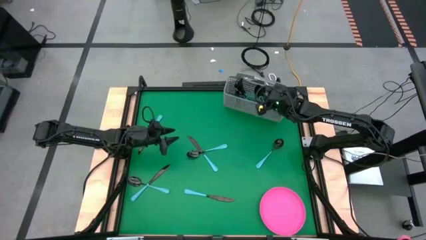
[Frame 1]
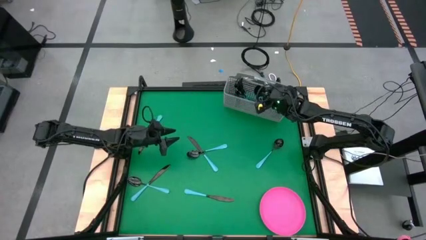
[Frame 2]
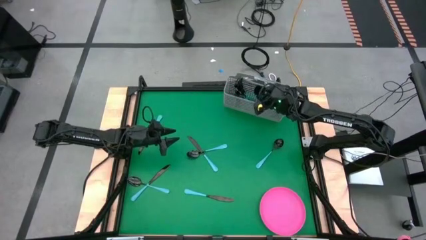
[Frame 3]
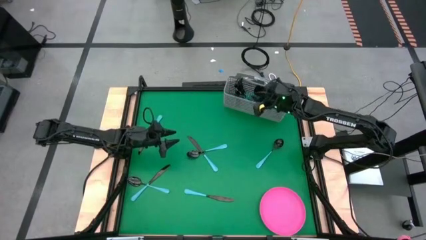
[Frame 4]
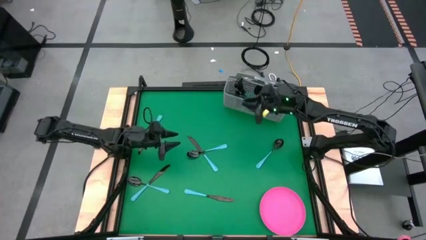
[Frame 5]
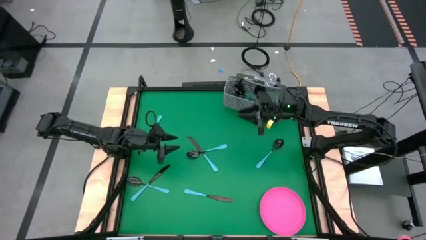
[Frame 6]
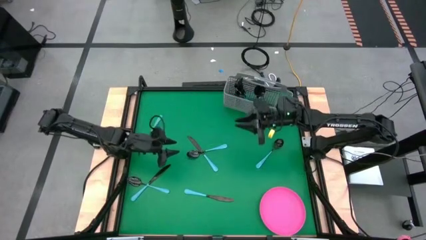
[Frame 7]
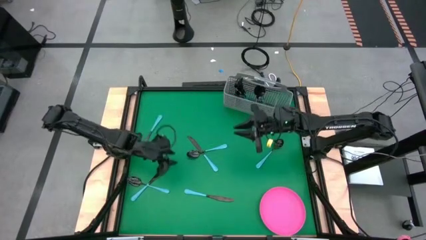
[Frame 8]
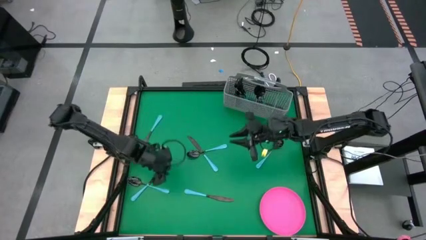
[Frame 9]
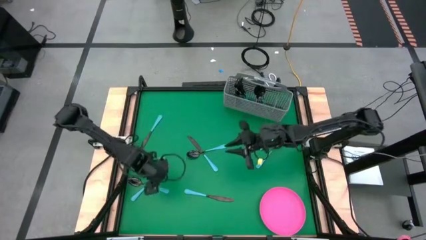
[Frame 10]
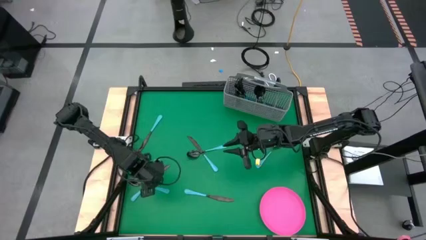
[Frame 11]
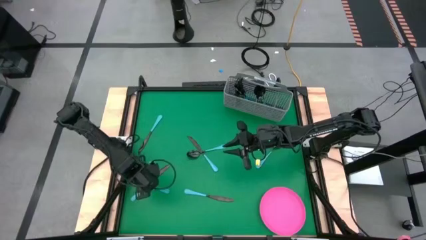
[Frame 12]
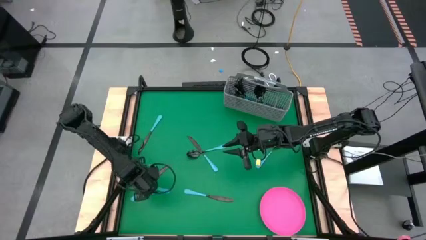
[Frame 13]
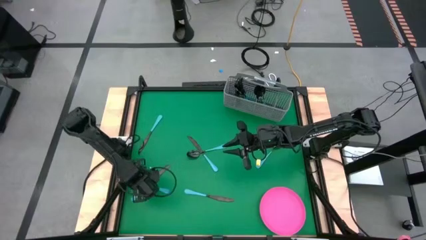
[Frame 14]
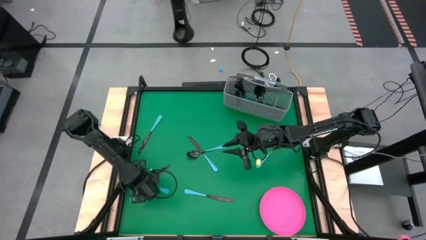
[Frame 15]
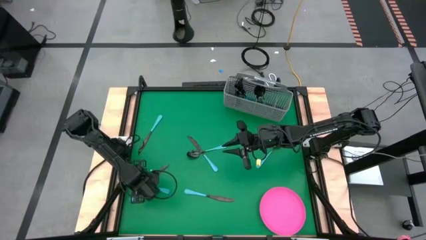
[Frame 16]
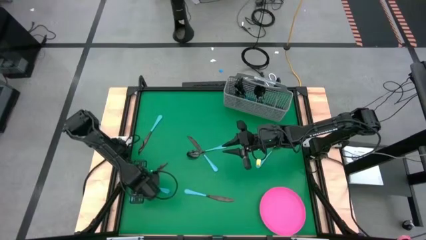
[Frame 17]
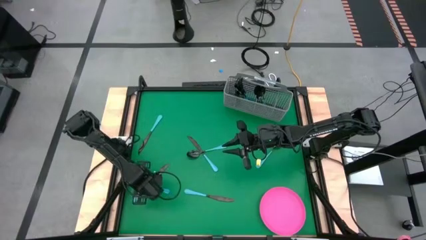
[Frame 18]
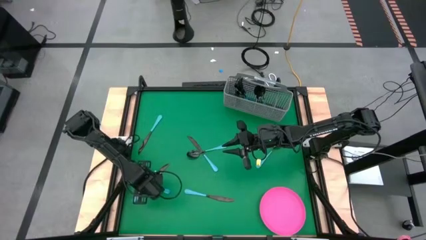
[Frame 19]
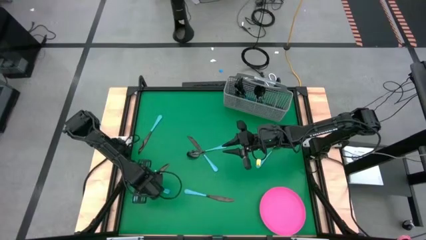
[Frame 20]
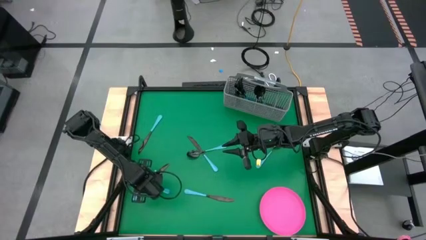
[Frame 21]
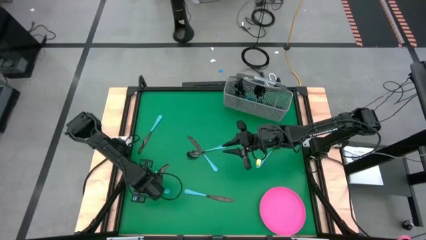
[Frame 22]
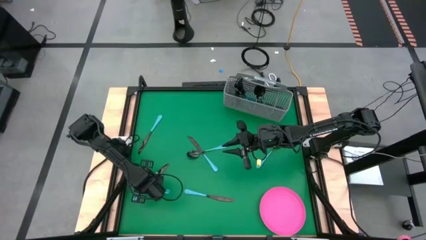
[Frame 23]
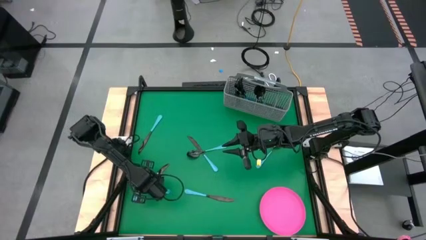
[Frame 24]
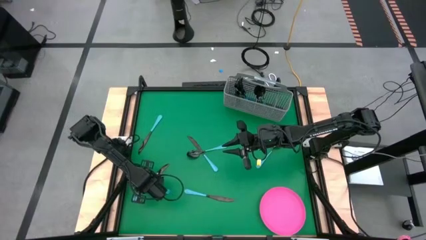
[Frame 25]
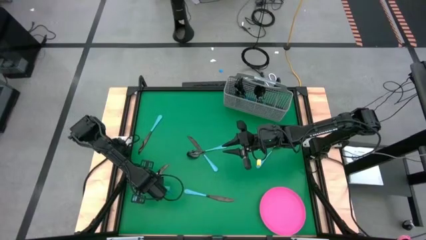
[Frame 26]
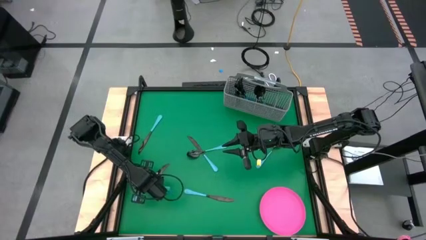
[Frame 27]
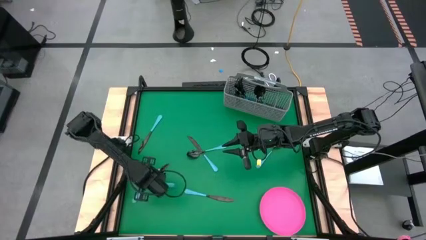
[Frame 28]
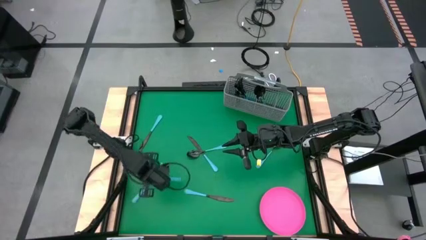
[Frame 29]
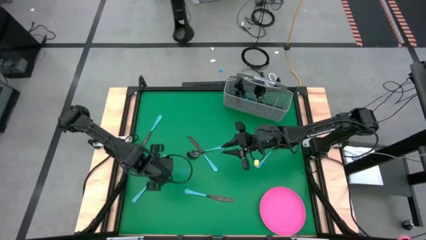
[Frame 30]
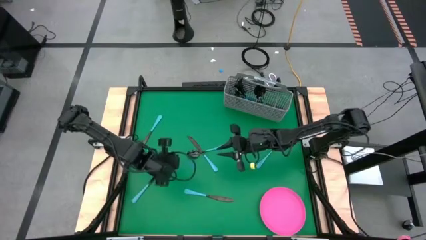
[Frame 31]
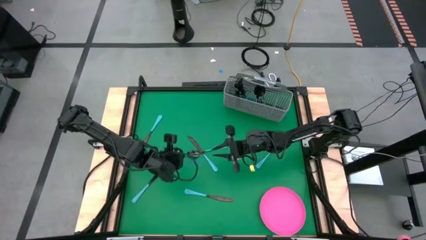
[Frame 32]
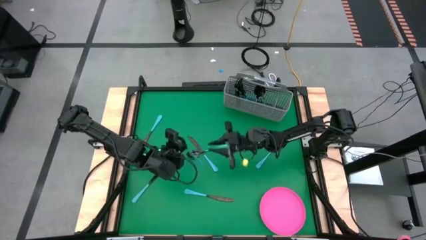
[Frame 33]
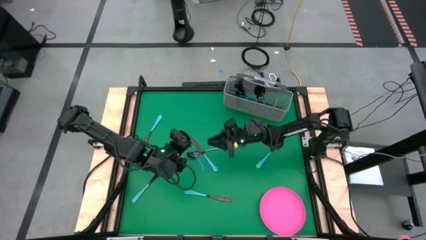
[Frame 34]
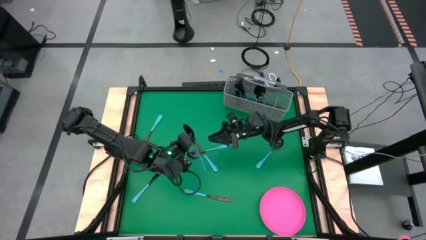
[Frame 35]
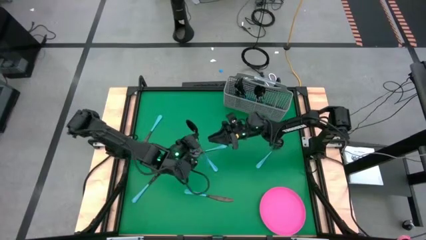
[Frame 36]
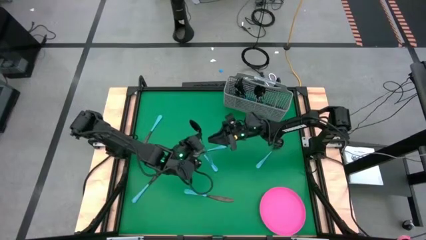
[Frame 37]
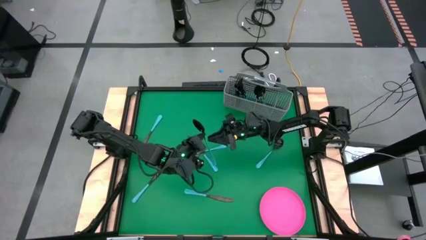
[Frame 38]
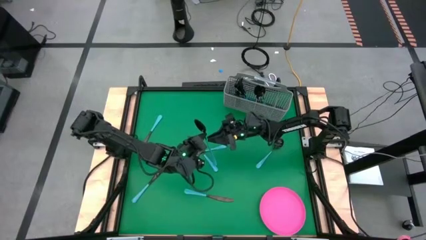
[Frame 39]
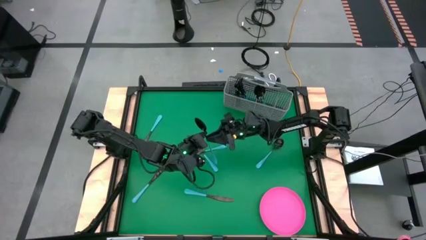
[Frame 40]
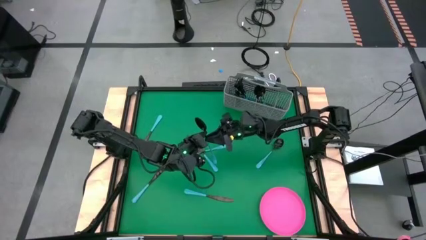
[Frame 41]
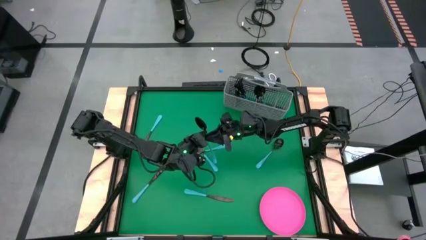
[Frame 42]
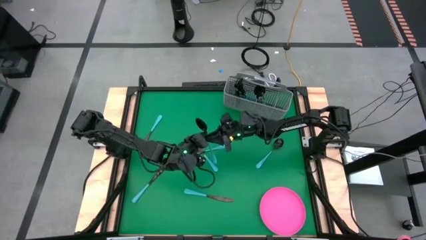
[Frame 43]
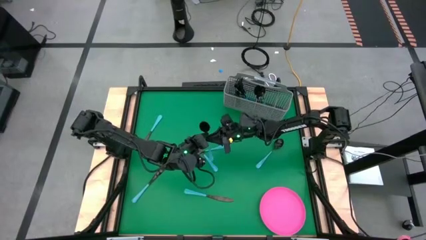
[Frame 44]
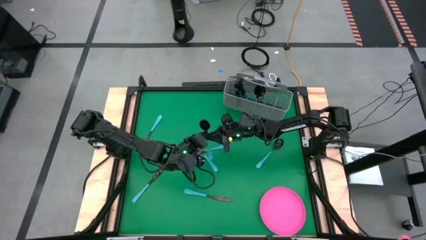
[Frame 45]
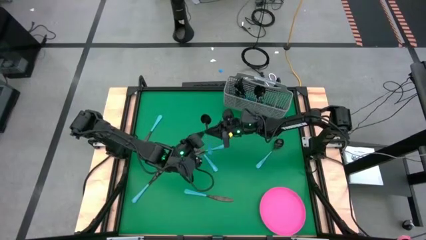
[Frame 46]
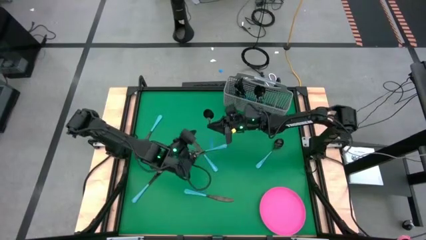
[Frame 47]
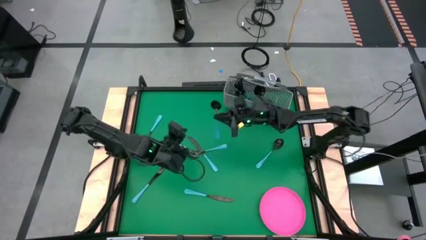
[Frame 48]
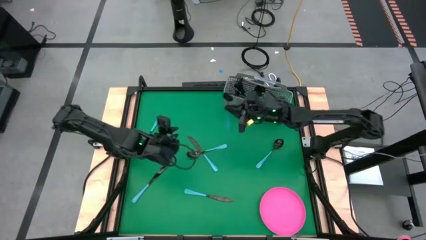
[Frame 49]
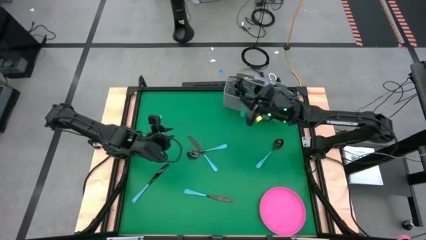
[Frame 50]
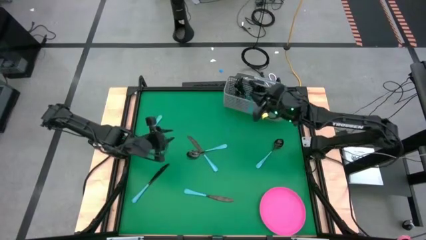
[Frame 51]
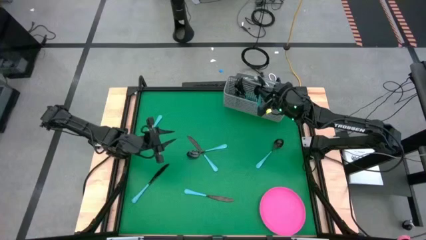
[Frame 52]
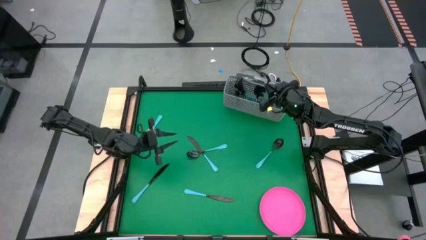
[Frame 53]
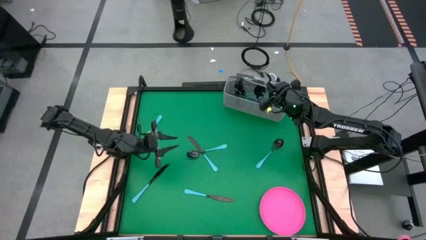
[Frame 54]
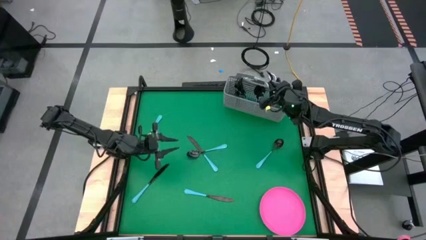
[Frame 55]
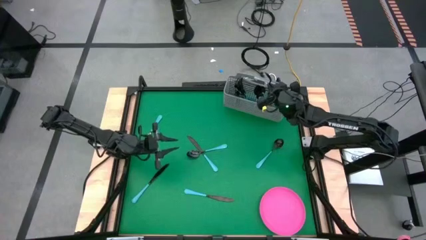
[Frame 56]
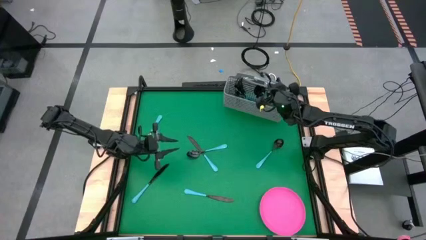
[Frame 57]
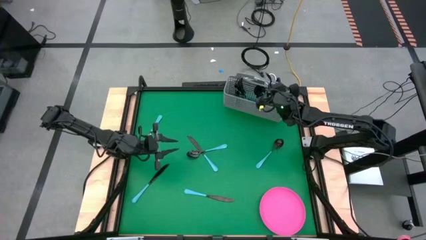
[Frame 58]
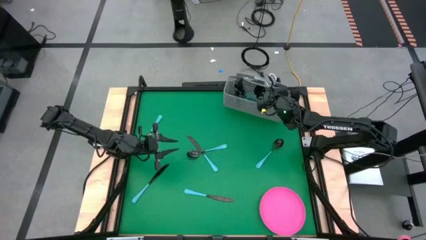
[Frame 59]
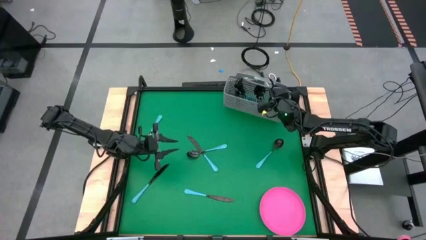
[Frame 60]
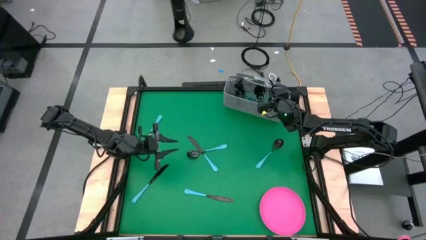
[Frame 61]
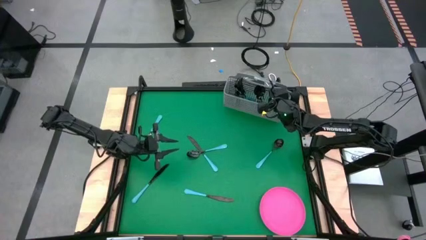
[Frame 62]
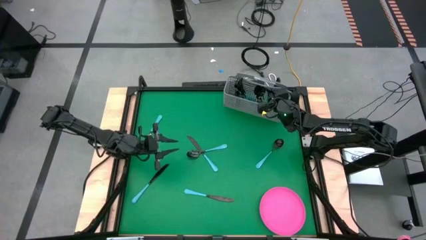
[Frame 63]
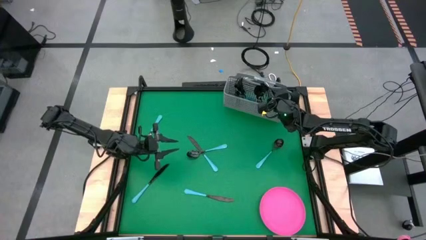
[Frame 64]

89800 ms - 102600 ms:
Task: Sort silverware
Put the blue spoon into the silverware basket

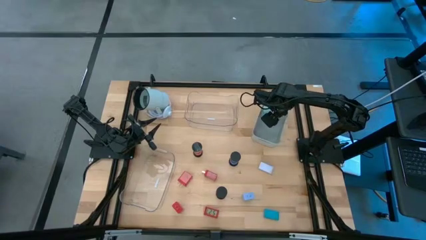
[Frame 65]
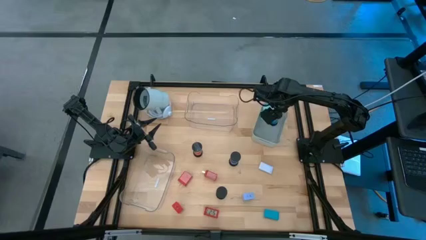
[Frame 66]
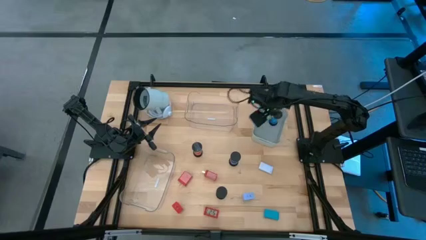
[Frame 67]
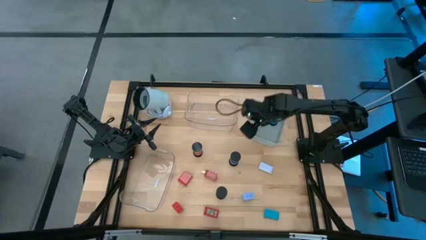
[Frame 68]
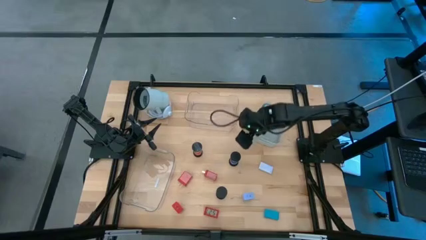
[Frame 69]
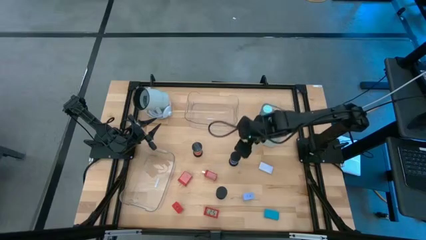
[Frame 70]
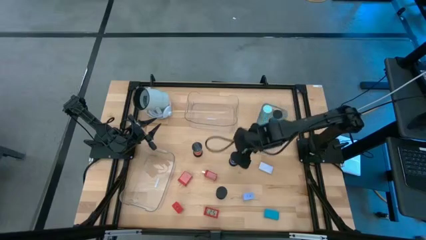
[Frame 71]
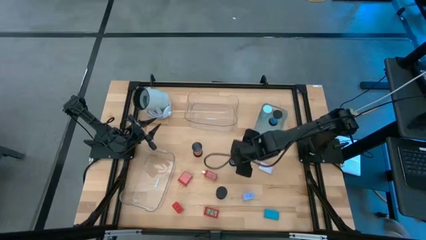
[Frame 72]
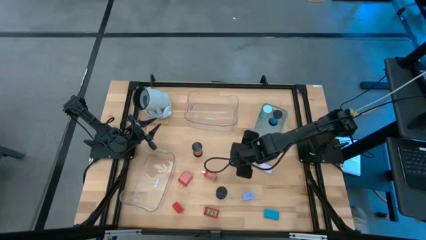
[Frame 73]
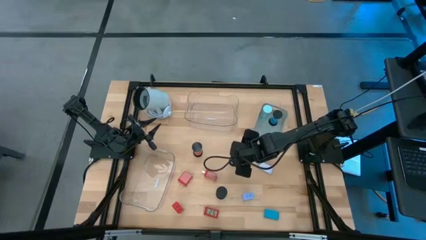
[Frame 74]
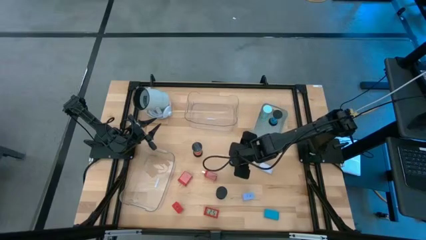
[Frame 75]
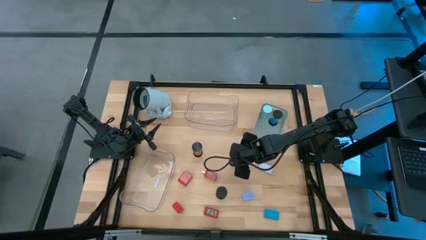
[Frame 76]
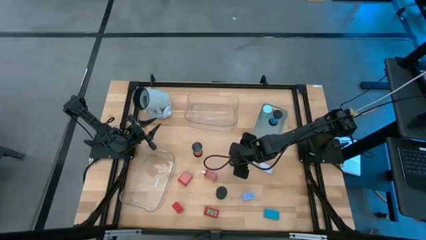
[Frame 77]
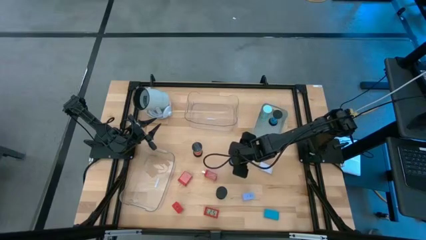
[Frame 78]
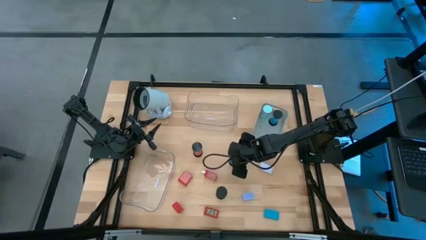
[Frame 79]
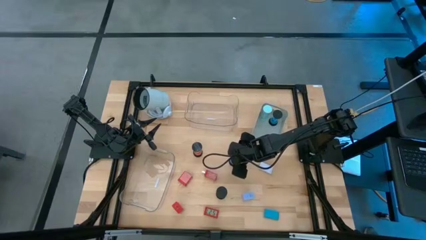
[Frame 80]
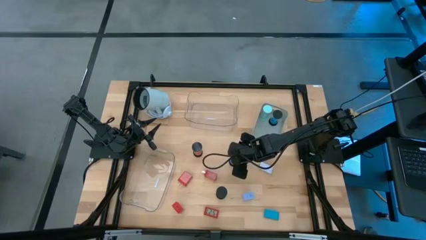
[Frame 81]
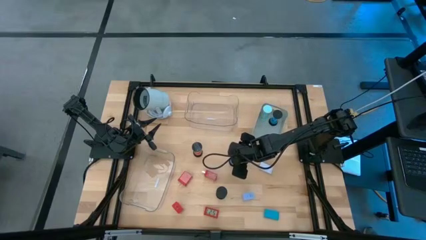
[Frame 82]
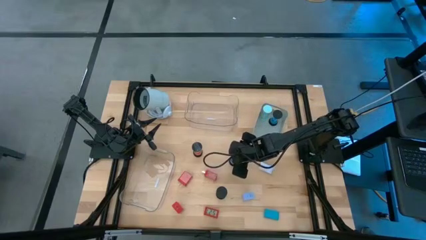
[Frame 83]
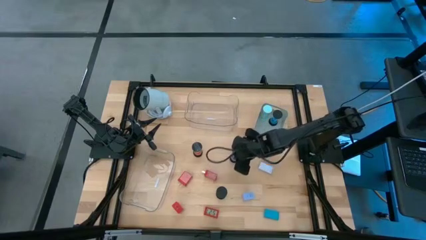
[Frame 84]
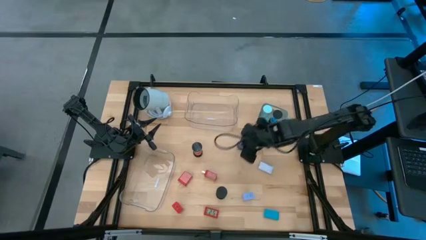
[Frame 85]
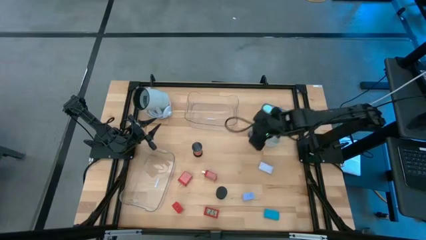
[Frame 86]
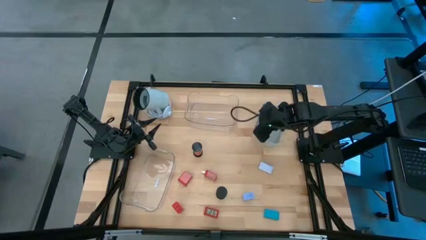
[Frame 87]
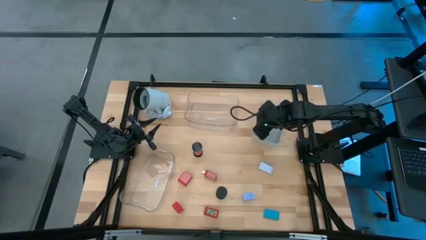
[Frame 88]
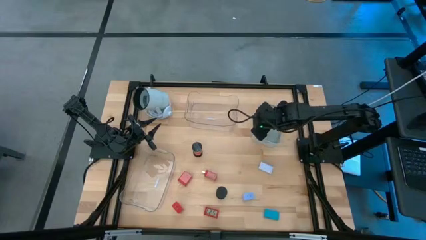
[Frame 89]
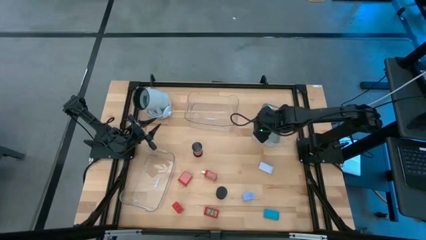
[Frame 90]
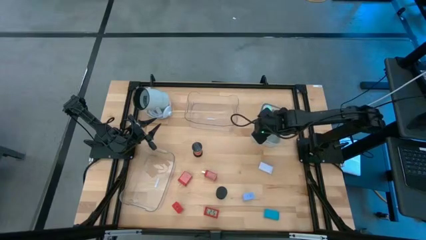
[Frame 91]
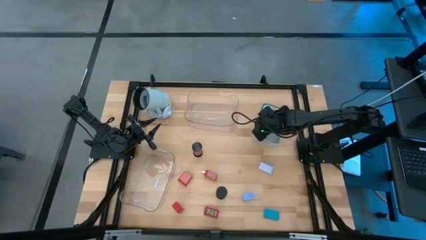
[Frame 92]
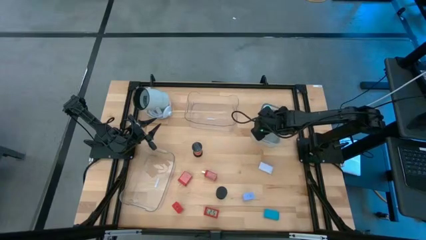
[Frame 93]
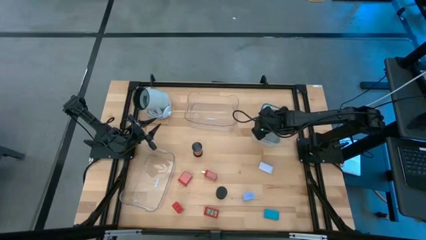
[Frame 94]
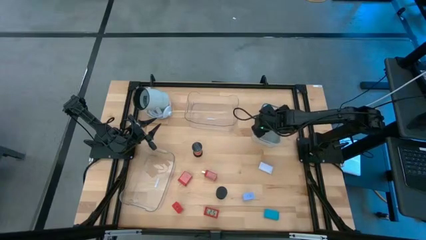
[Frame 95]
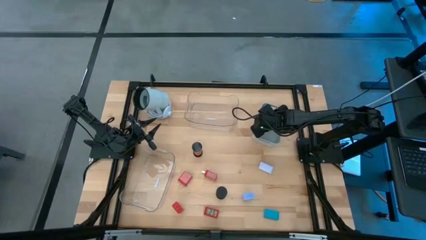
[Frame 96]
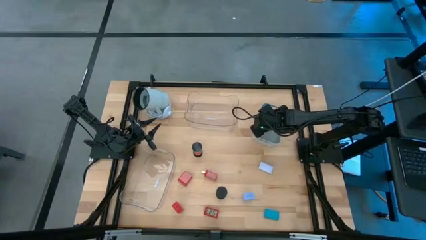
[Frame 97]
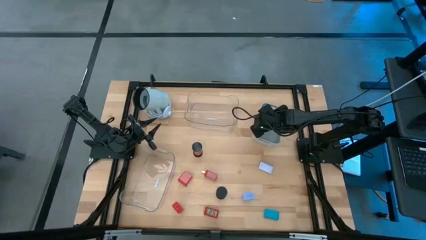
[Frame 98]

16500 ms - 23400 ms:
Task: Pick & Place Office items
Put the blue hourglass into the grey bin
